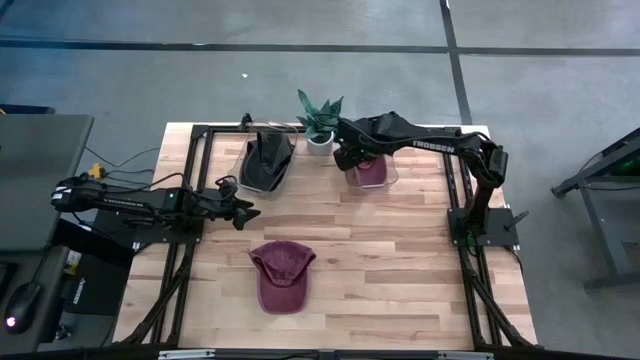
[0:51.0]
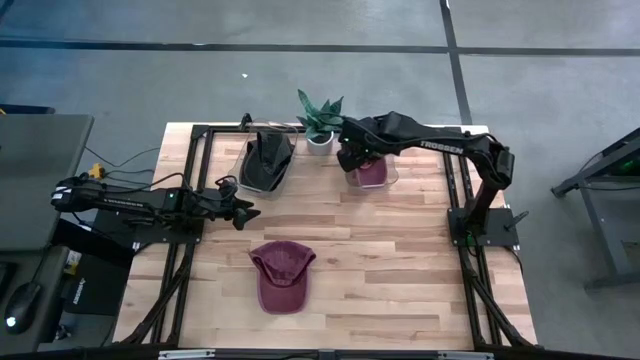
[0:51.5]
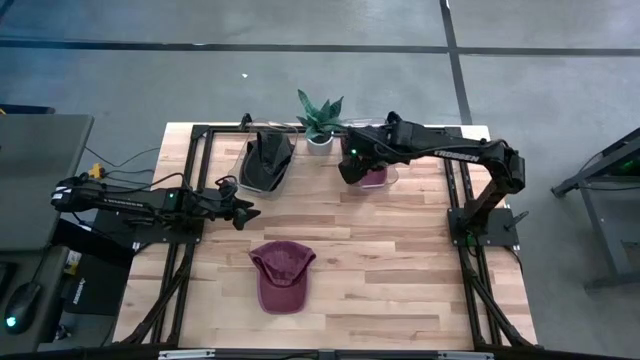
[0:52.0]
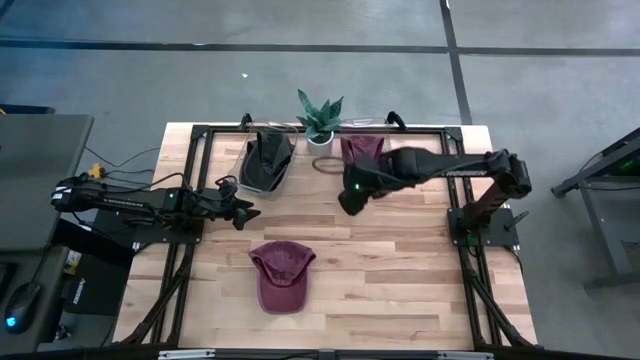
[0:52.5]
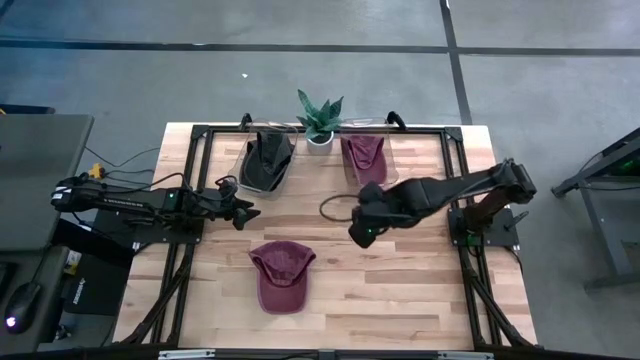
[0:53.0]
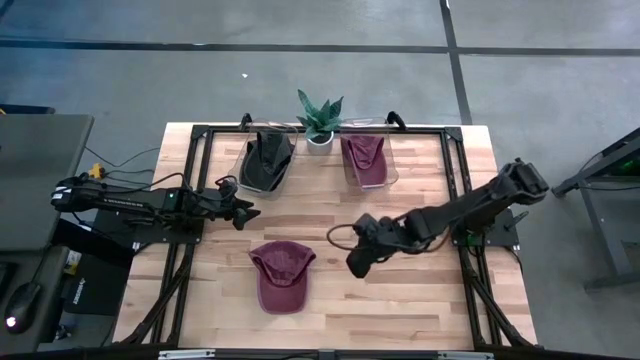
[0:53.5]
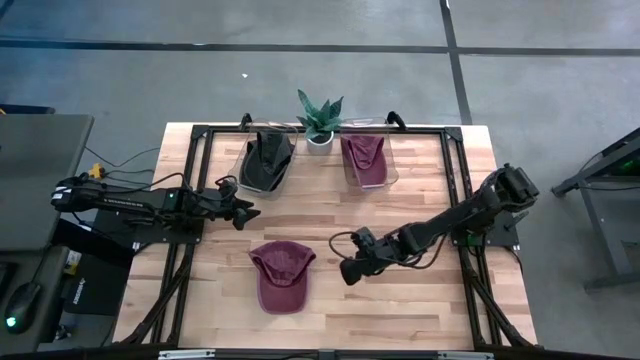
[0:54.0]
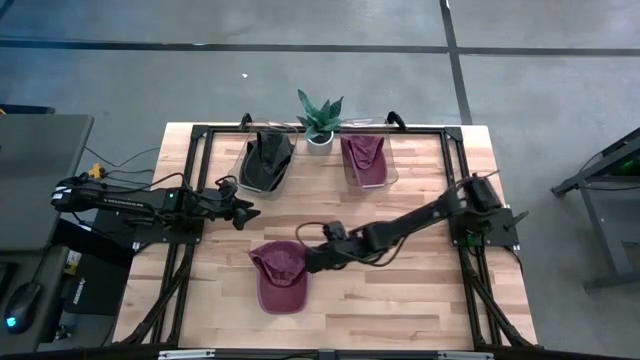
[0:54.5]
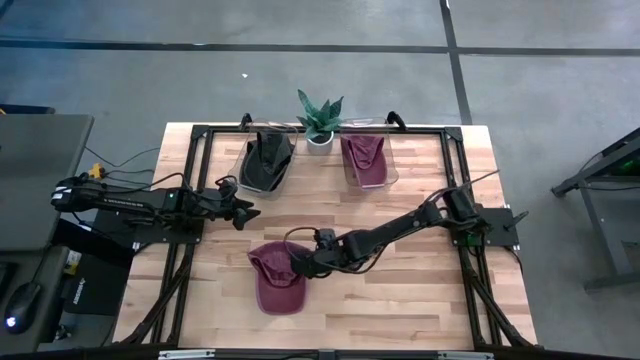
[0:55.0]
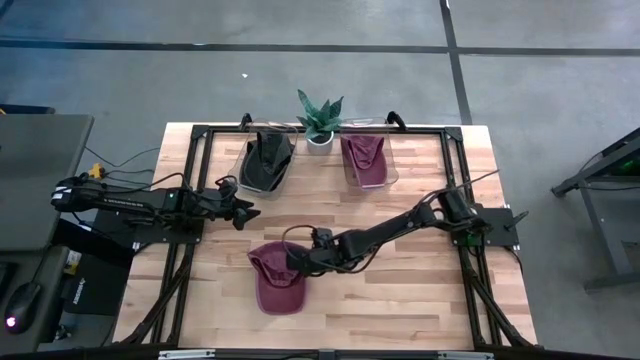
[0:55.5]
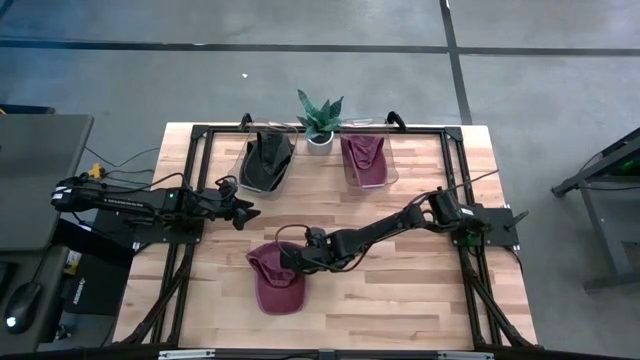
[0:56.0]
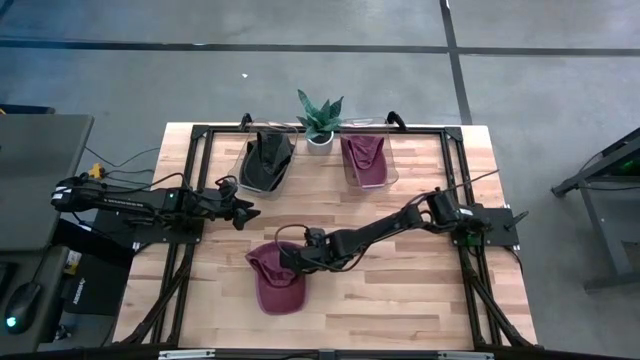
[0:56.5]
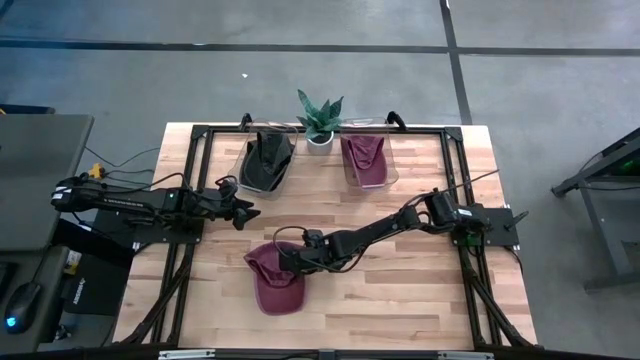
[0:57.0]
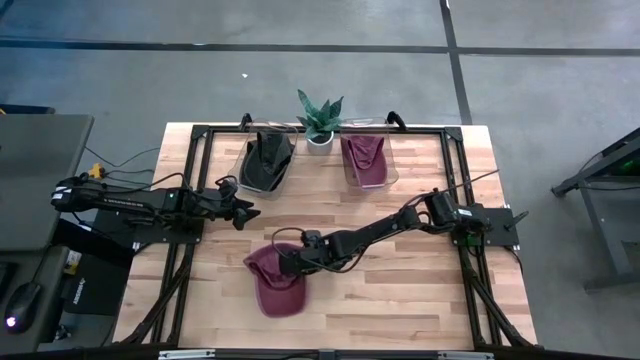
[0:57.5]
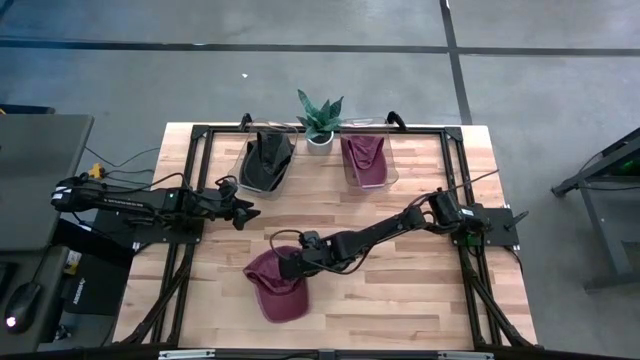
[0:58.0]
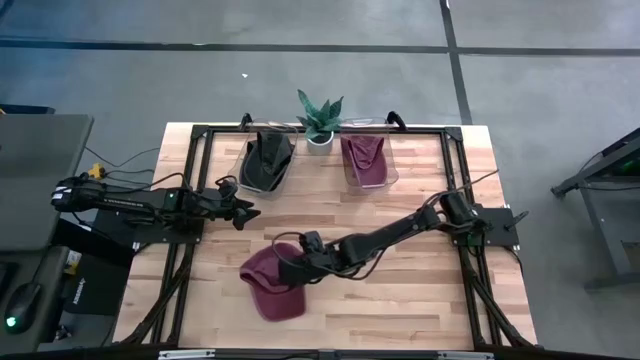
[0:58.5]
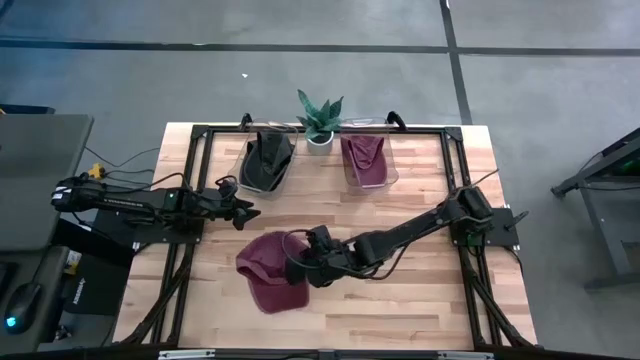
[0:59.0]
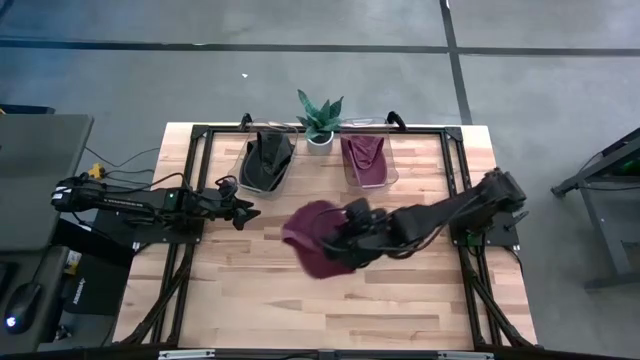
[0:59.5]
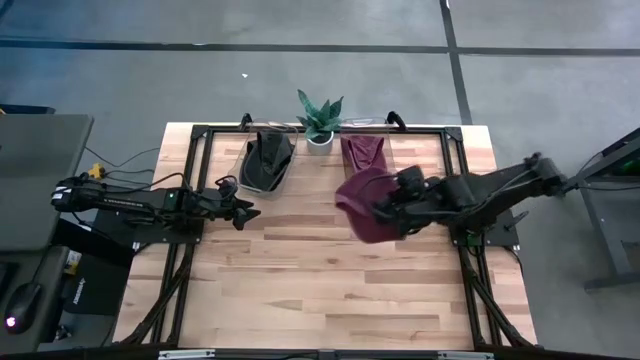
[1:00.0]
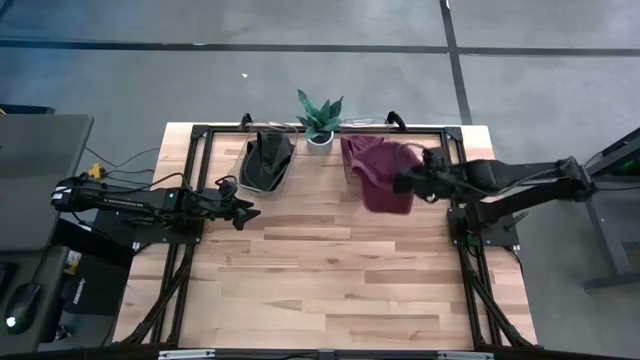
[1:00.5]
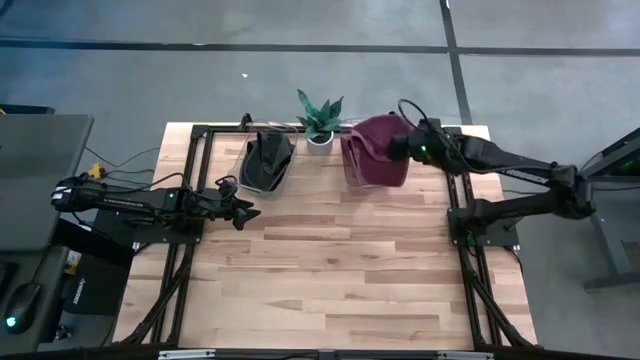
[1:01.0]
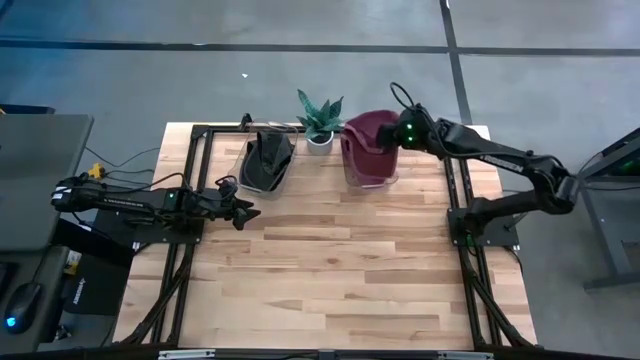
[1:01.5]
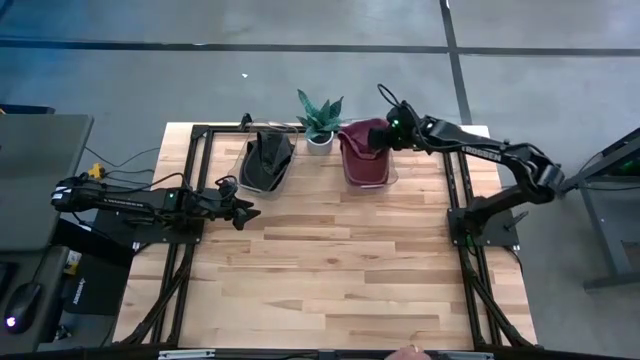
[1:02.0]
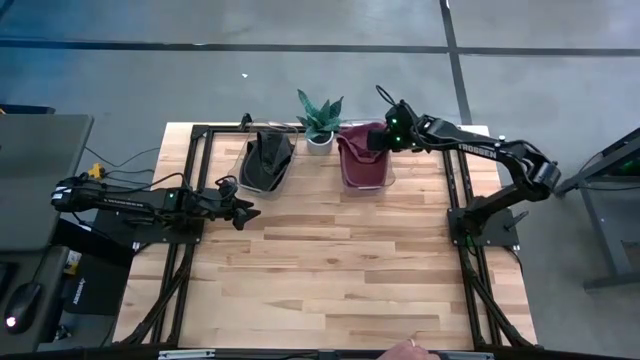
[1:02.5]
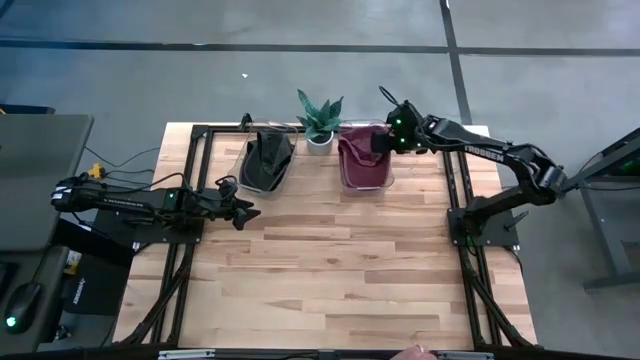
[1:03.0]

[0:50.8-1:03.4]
Task: Pick & Place hat
Put the red cap into the right transparent bin

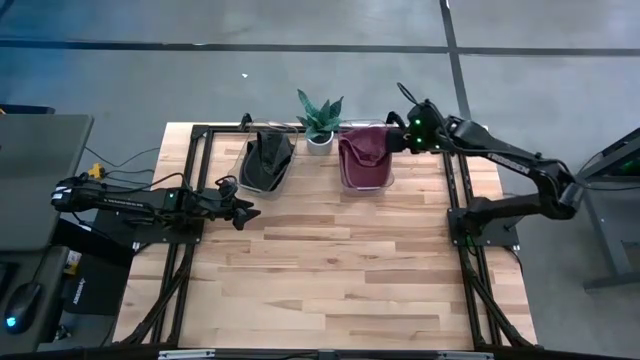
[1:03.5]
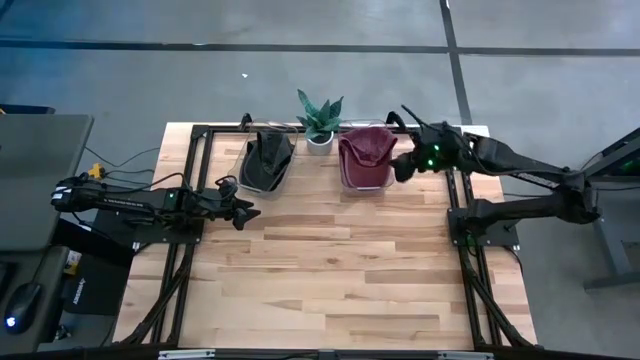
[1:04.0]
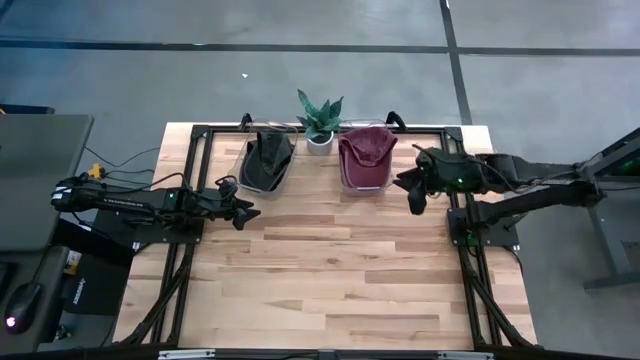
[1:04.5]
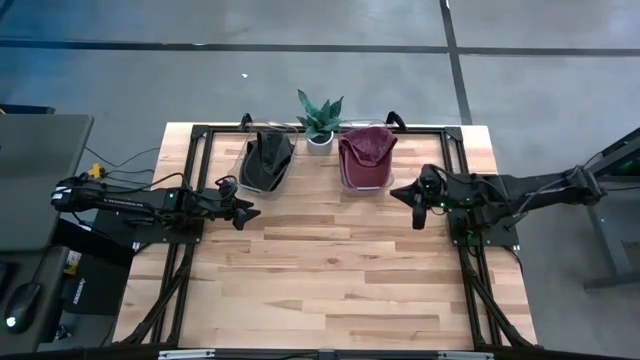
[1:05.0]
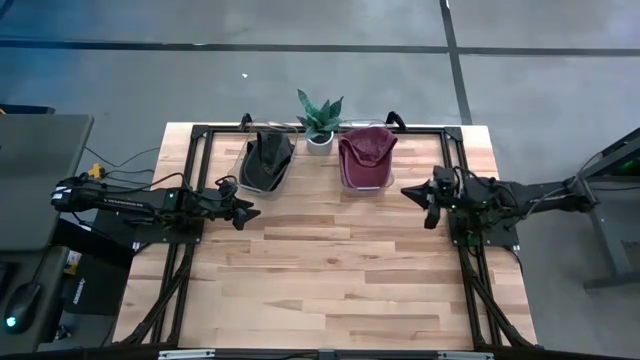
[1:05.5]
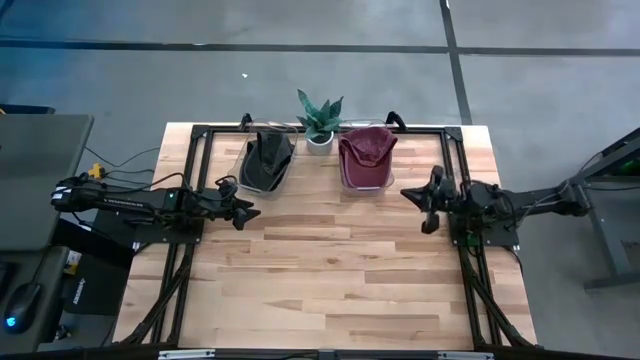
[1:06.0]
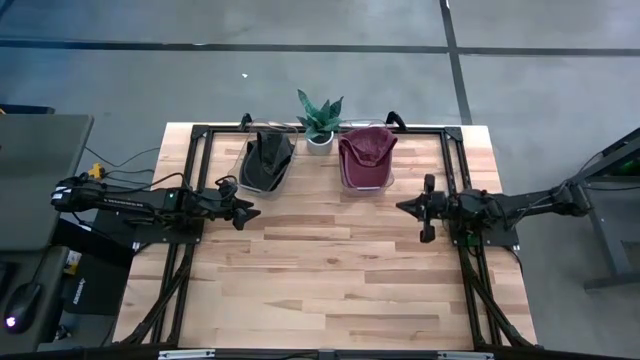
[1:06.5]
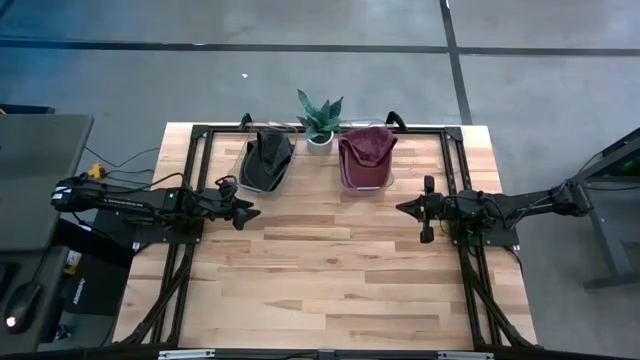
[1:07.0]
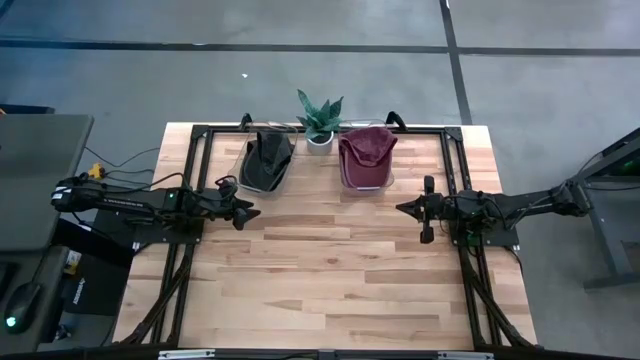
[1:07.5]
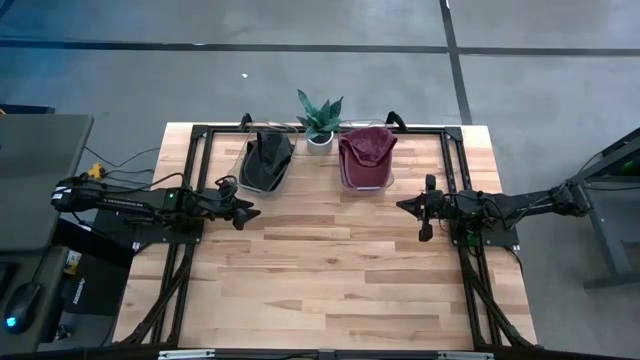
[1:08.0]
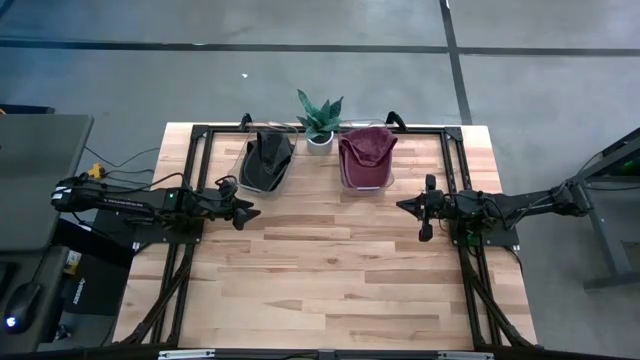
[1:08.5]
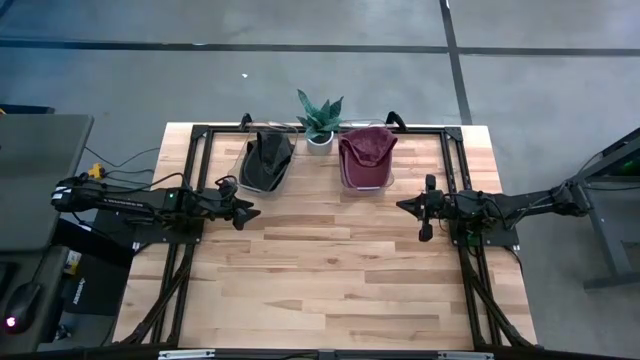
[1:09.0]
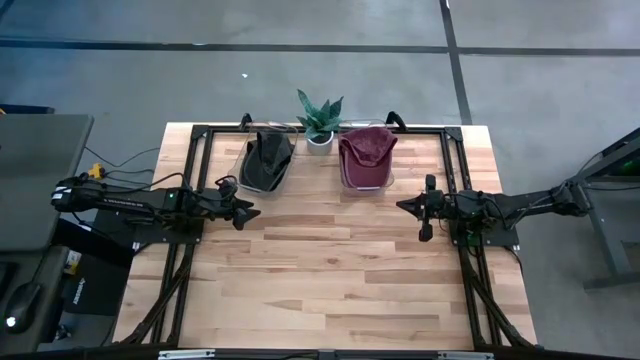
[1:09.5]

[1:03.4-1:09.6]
Return to Home Position
